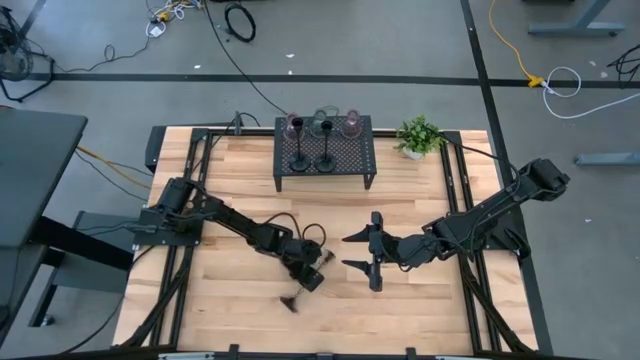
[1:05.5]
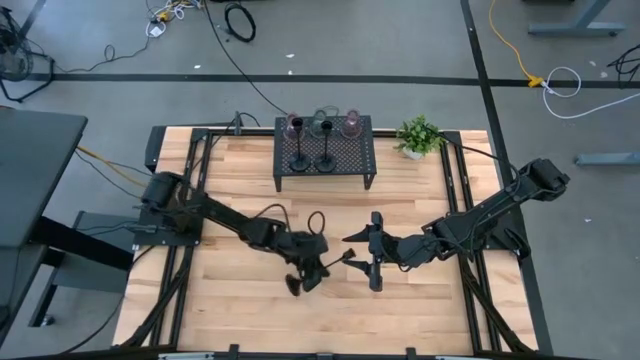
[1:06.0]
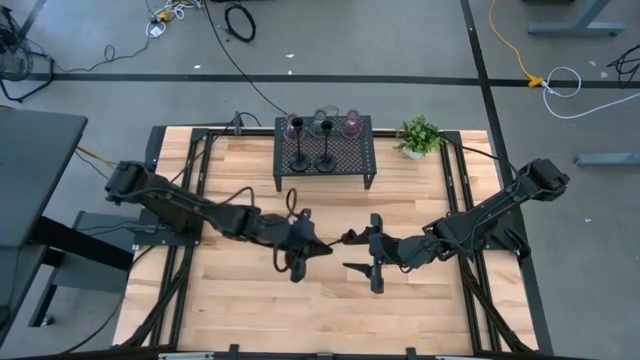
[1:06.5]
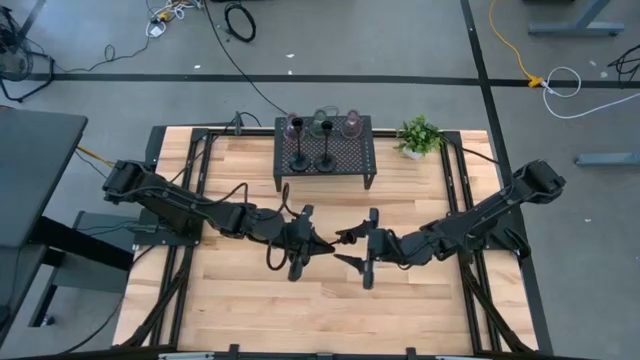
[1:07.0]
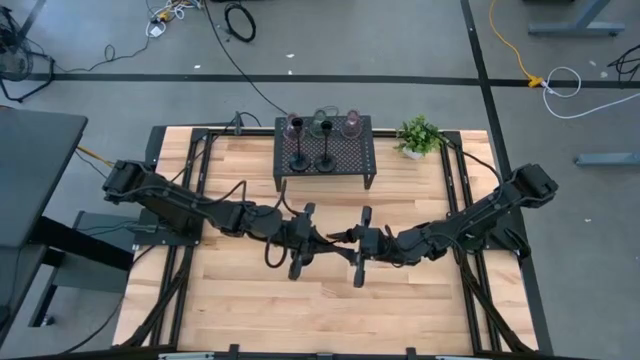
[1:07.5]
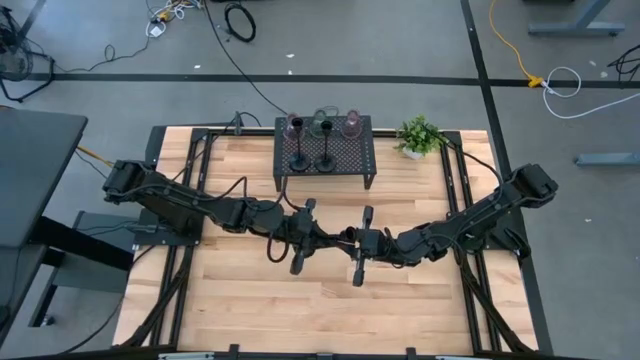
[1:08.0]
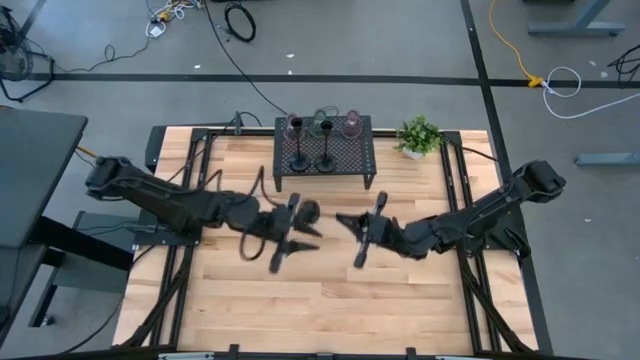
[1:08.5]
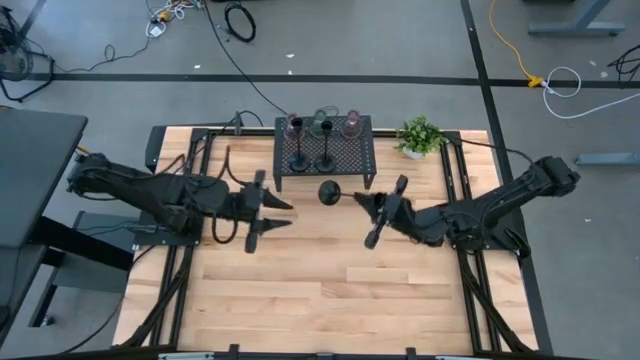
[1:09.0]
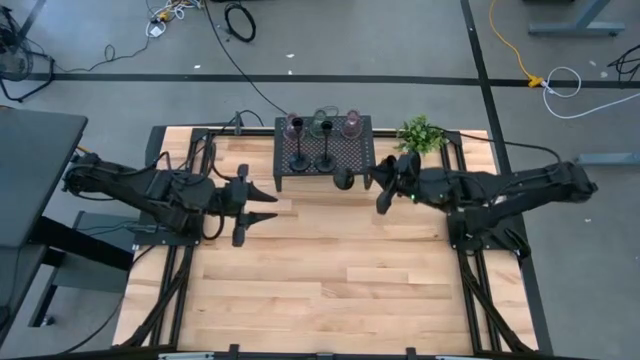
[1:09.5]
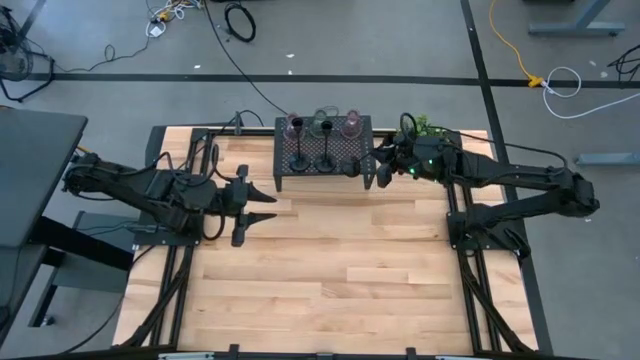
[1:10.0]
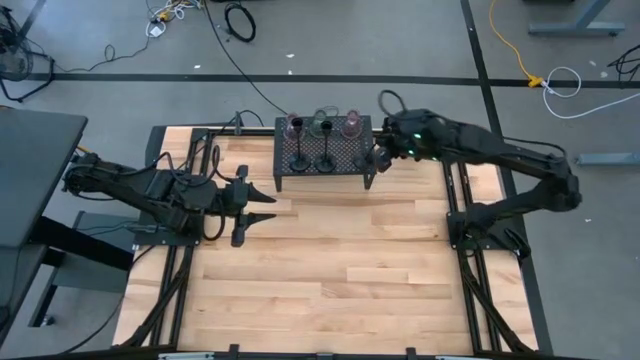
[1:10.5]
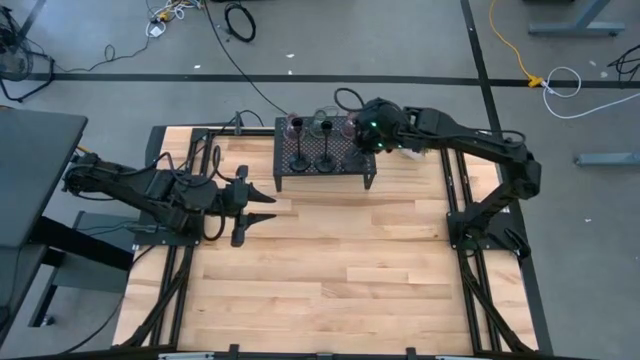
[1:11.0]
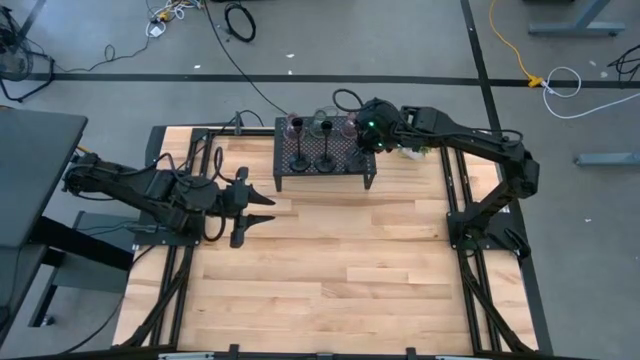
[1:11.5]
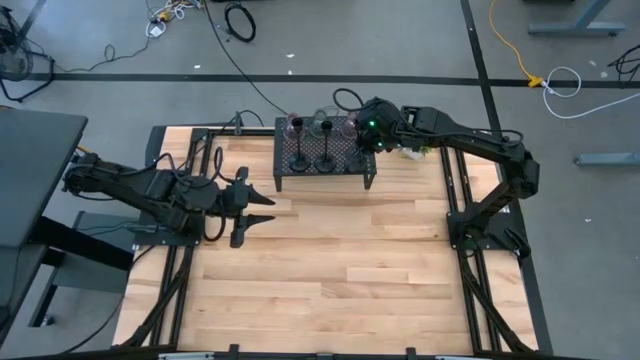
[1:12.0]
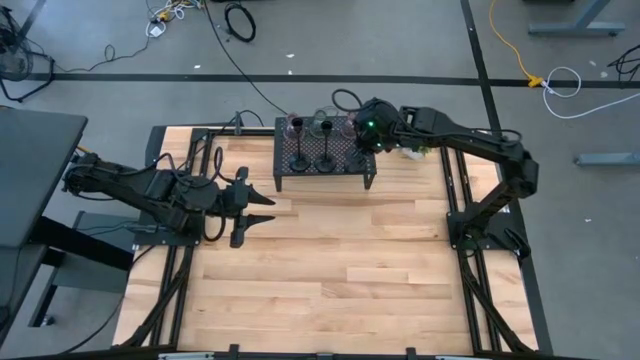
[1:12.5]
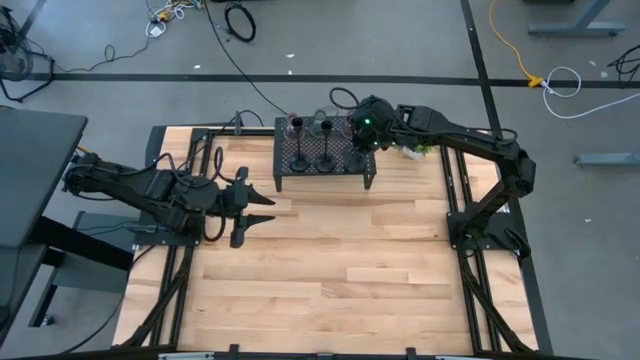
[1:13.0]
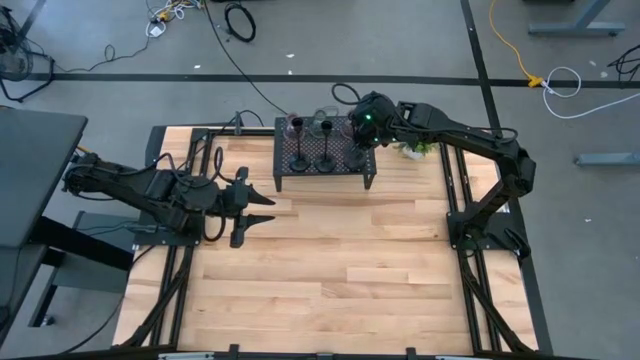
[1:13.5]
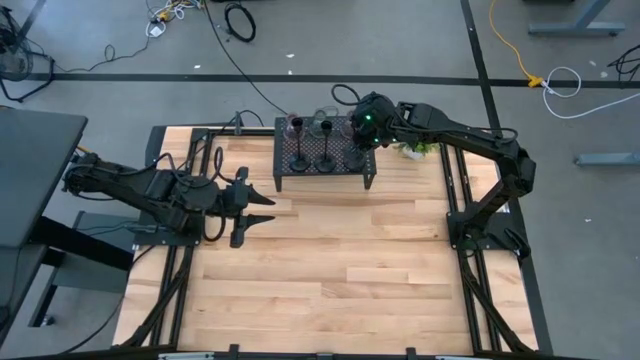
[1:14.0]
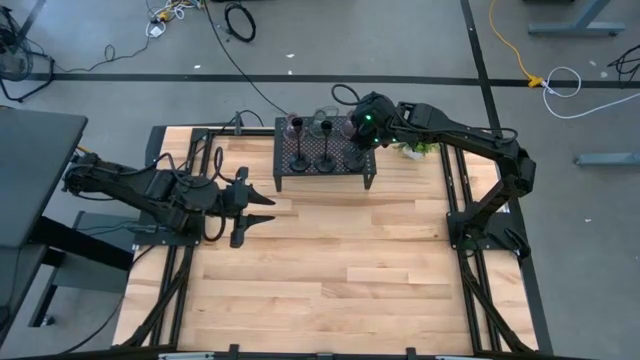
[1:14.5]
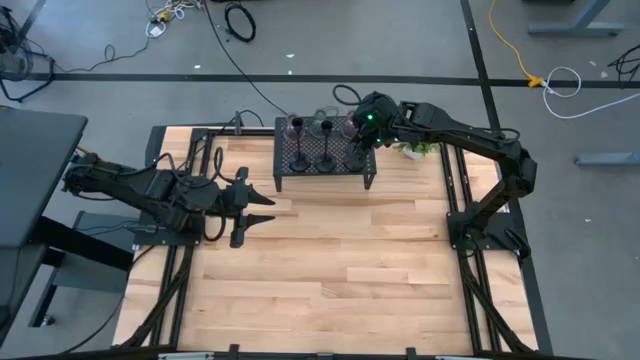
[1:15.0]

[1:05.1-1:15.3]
Task: Pick & Place candle stick holders
Put the black candle holder on the shelf

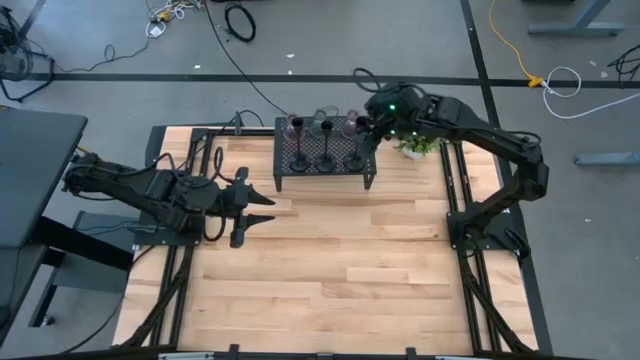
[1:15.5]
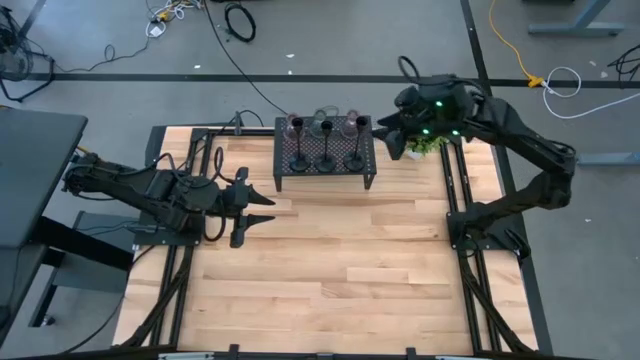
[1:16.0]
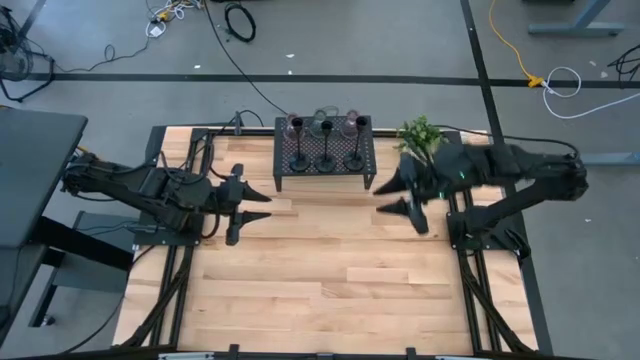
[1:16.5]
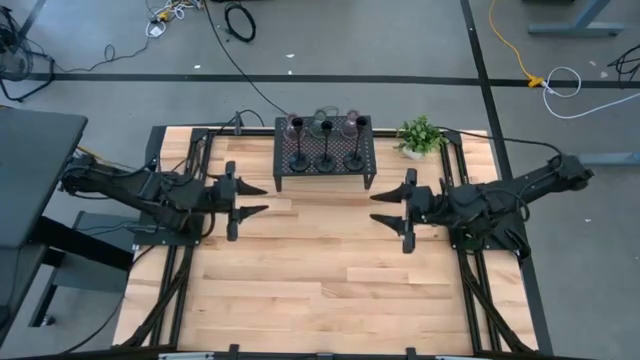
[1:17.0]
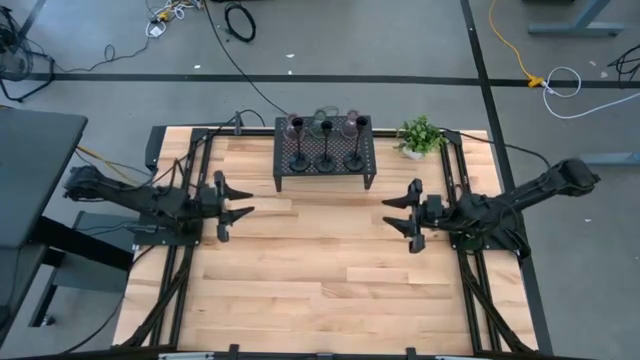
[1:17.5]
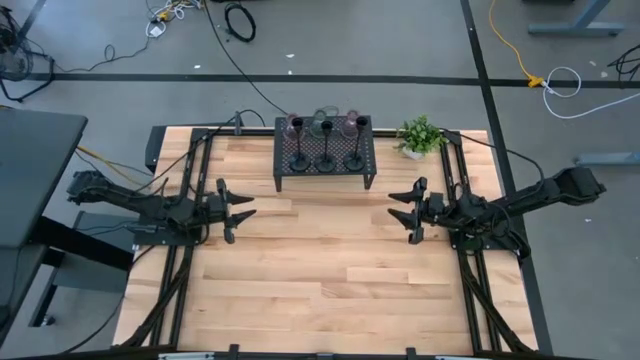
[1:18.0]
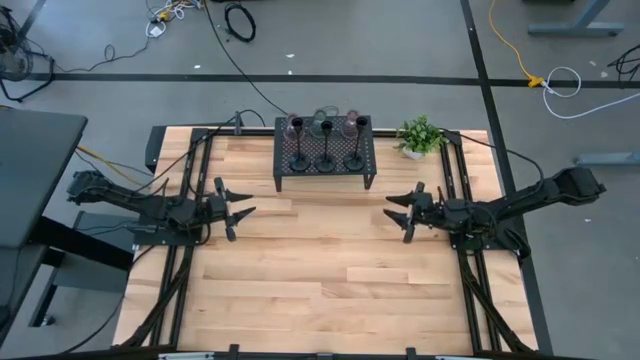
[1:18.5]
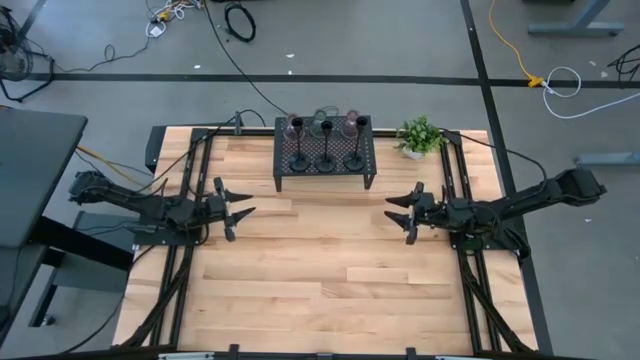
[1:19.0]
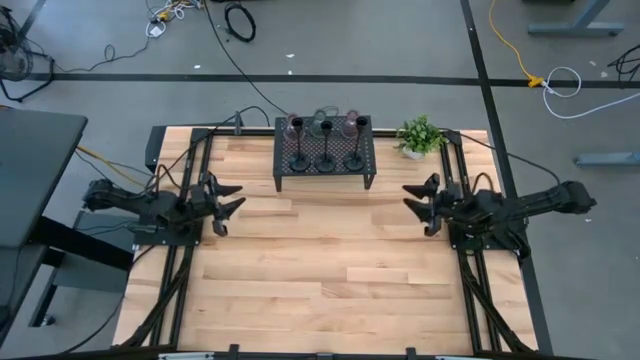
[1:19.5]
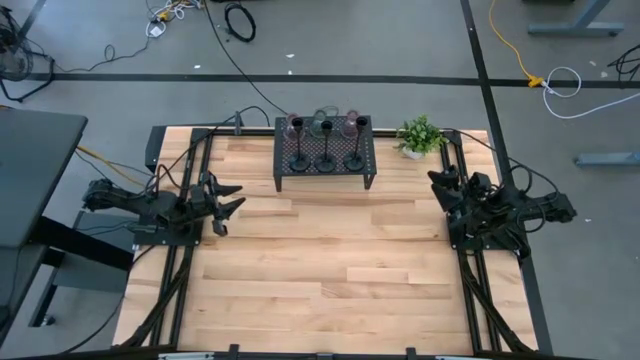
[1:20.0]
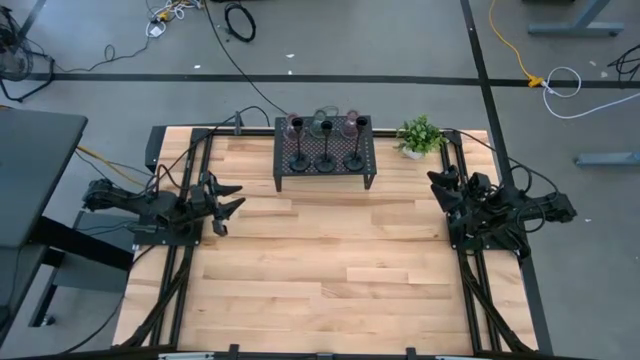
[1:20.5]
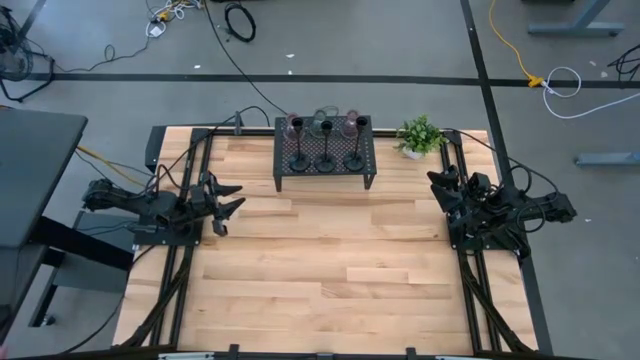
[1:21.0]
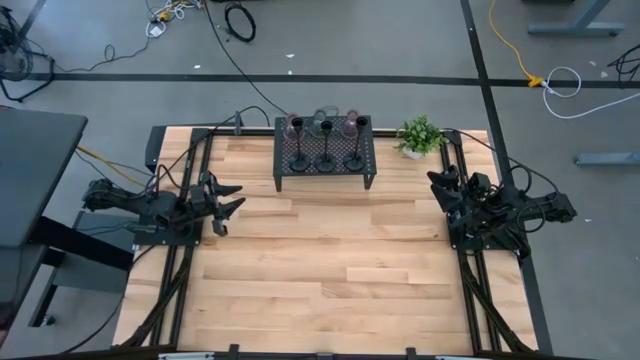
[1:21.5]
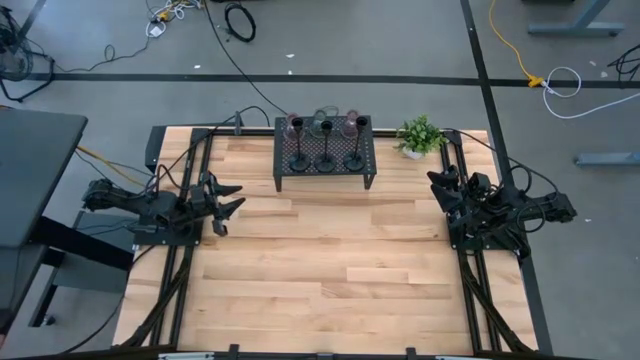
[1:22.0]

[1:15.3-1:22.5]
Return to Home Position

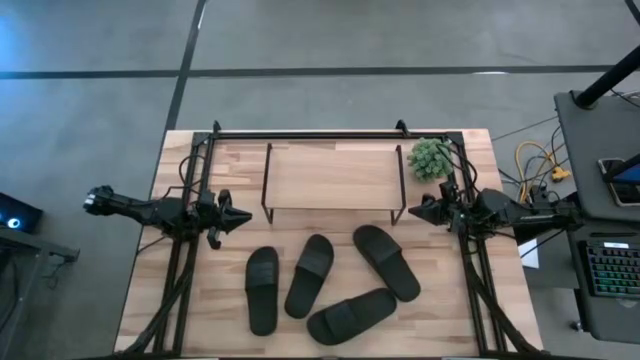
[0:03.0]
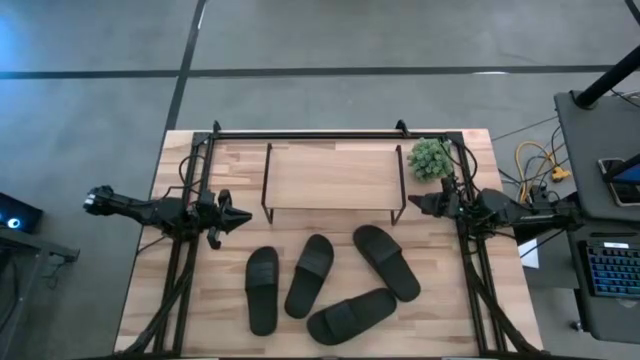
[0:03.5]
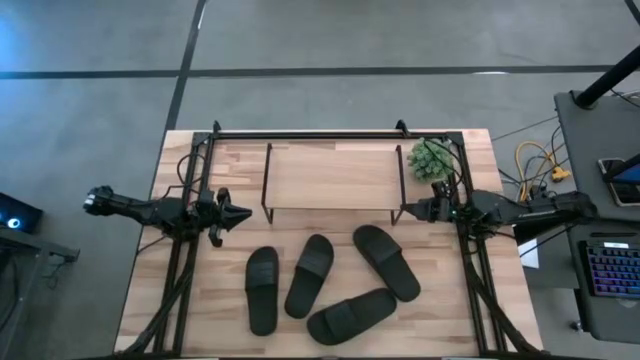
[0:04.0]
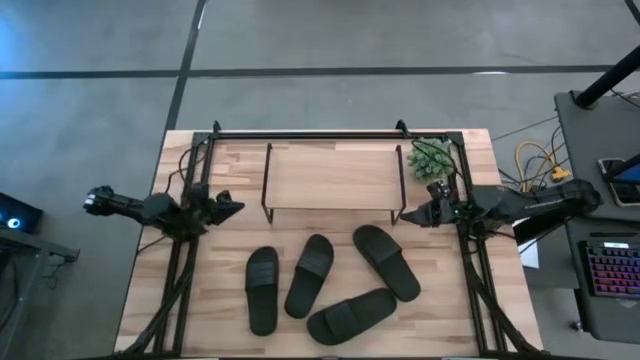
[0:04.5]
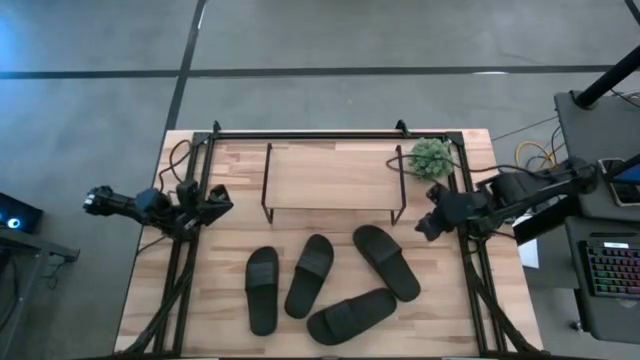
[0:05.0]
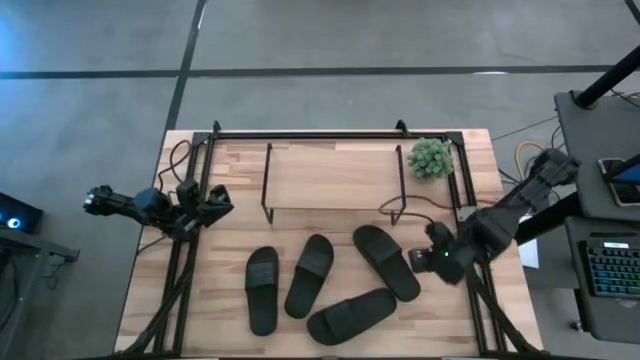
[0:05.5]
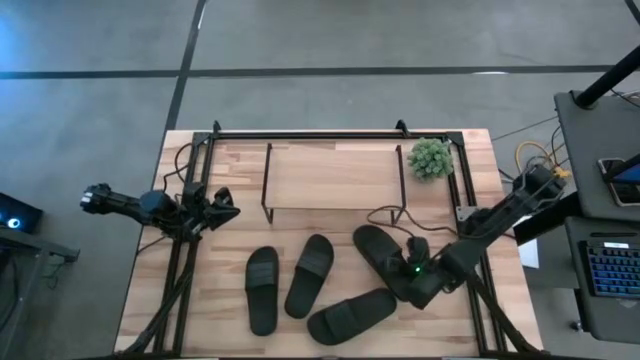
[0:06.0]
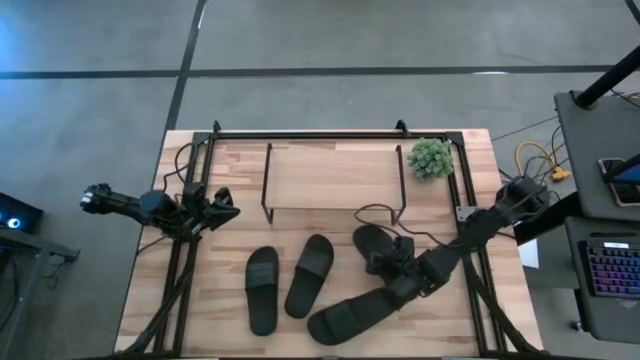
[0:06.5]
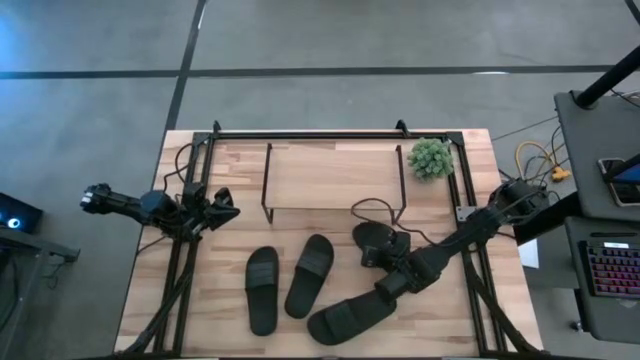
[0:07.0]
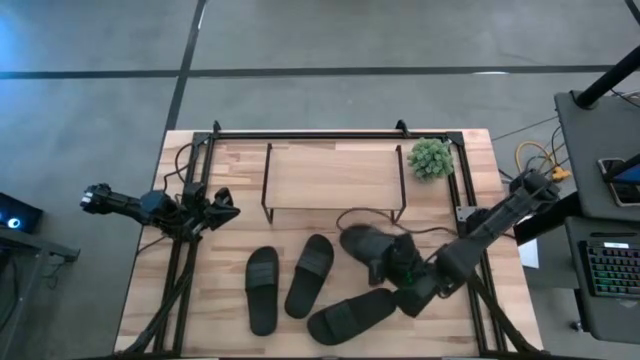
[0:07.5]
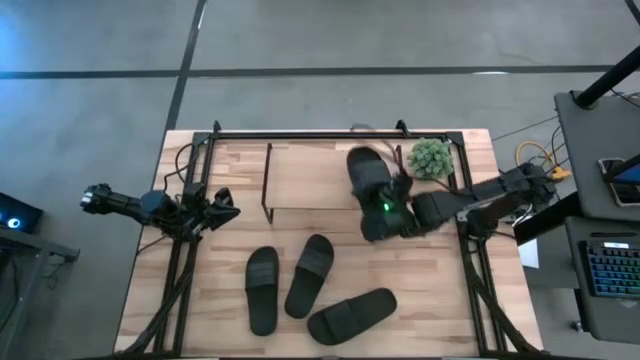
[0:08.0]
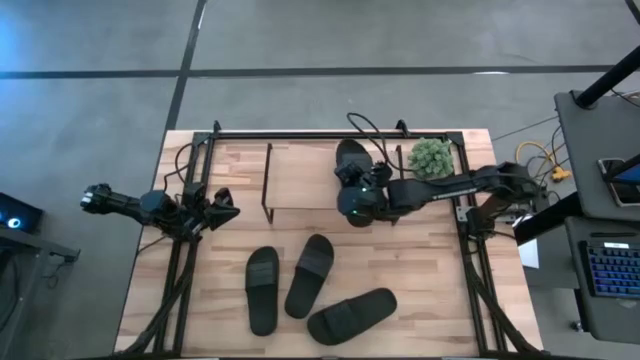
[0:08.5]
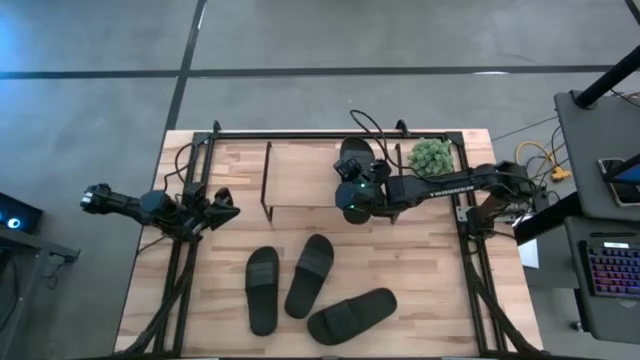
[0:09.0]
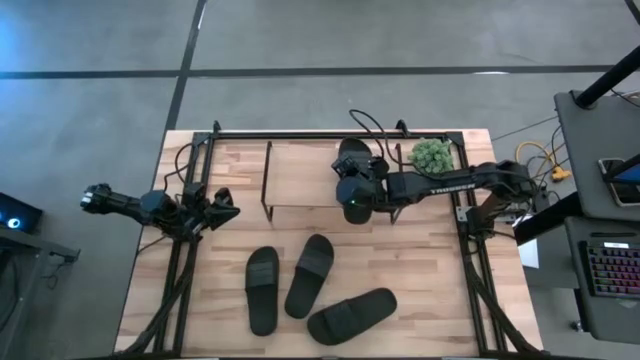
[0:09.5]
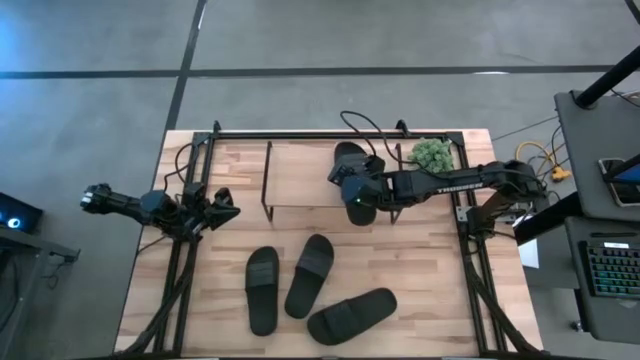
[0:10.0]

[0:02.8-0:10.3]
Task: Pick and place slides into the shelf
Put the black slide on the shelf
